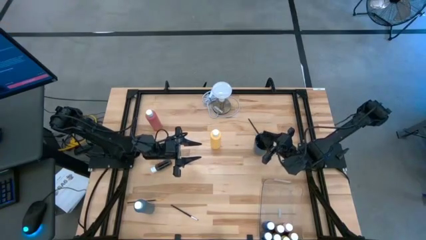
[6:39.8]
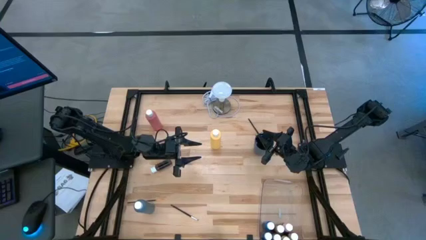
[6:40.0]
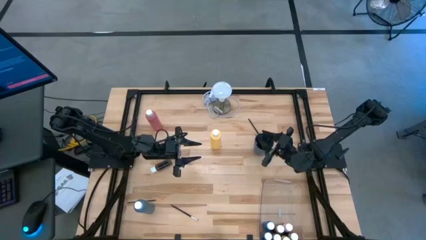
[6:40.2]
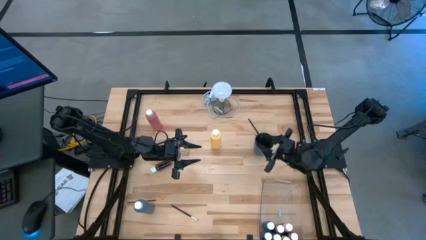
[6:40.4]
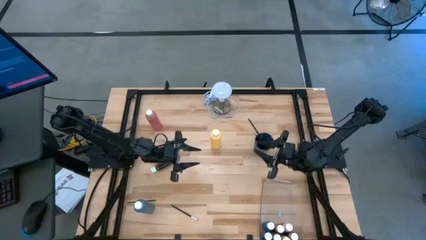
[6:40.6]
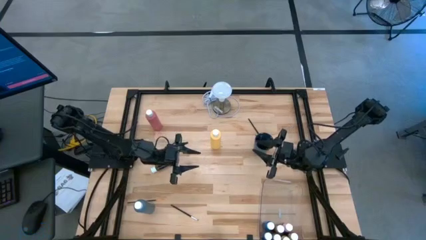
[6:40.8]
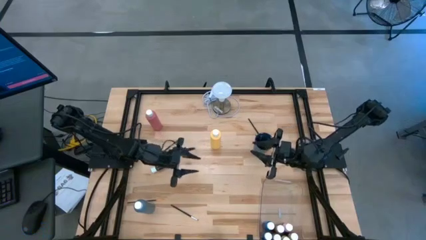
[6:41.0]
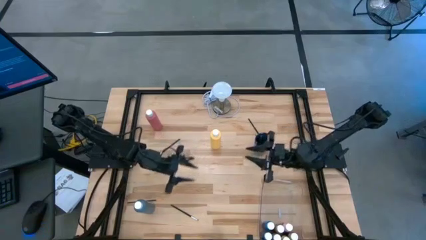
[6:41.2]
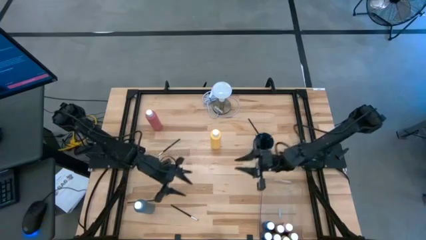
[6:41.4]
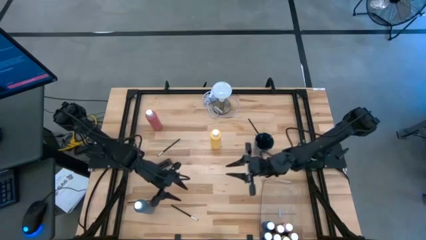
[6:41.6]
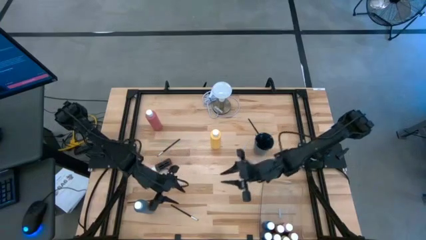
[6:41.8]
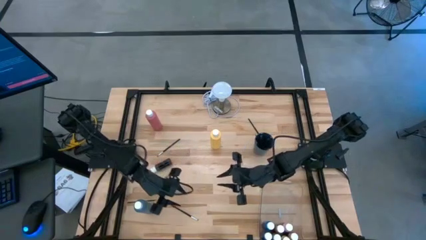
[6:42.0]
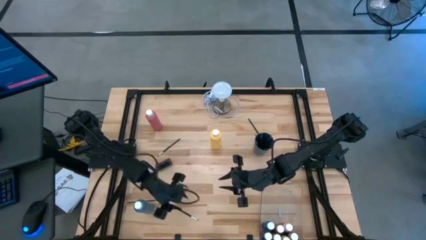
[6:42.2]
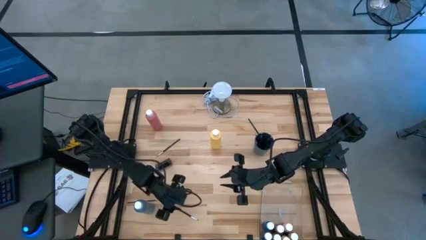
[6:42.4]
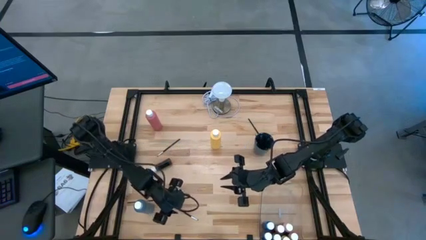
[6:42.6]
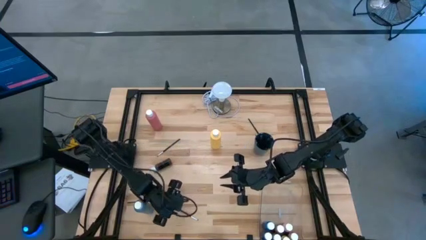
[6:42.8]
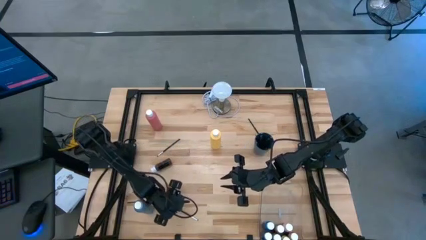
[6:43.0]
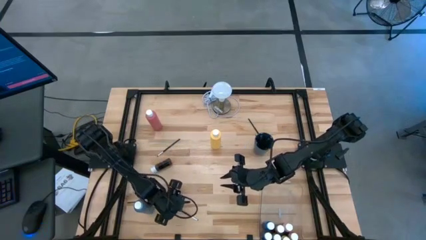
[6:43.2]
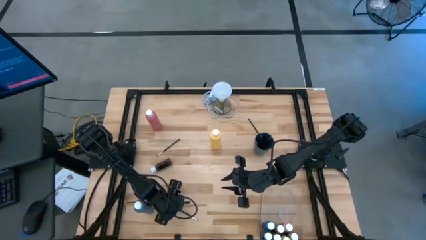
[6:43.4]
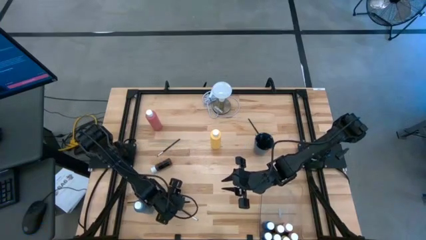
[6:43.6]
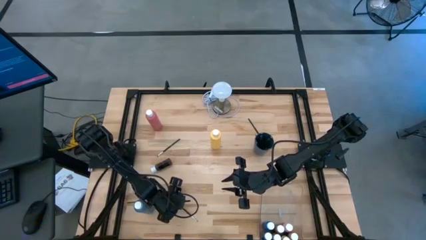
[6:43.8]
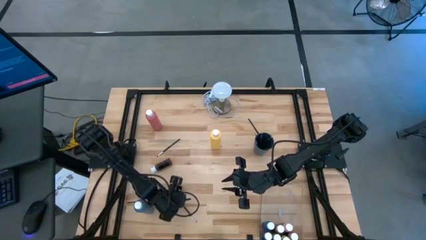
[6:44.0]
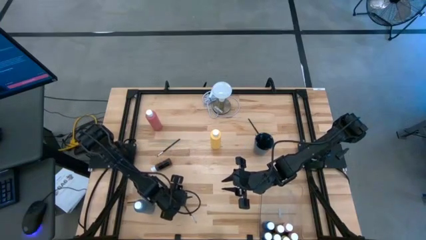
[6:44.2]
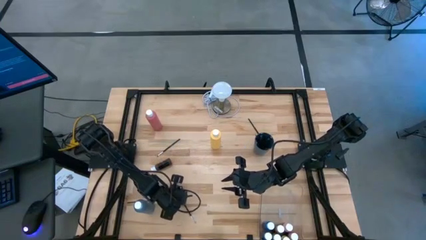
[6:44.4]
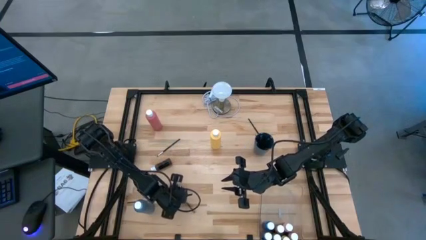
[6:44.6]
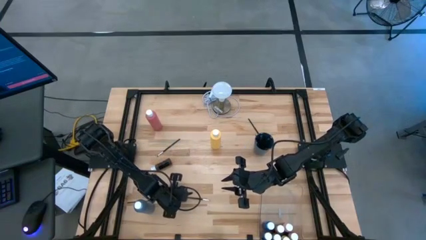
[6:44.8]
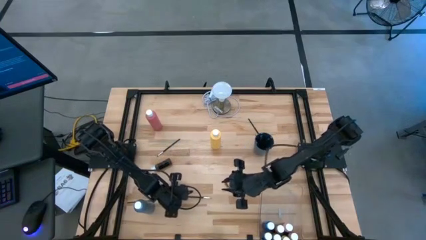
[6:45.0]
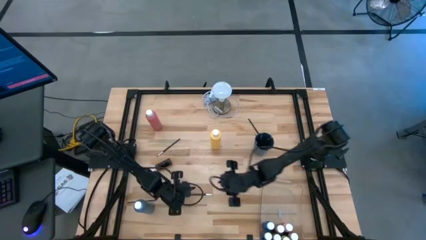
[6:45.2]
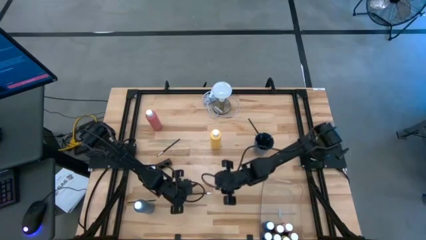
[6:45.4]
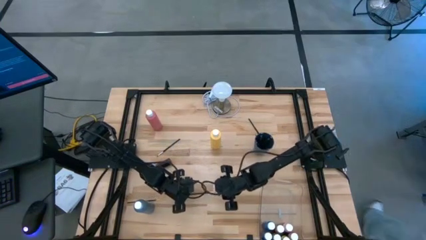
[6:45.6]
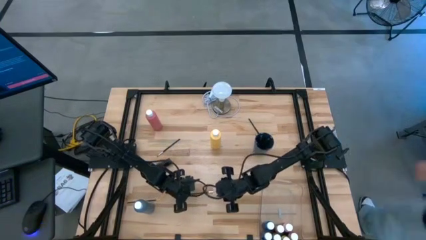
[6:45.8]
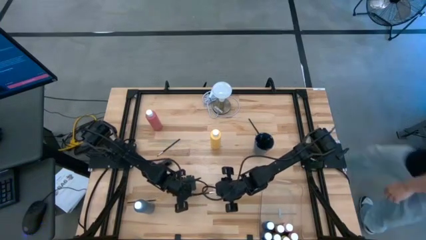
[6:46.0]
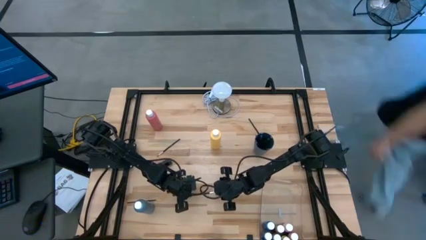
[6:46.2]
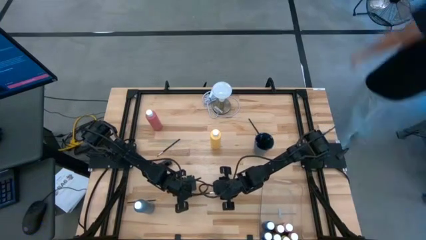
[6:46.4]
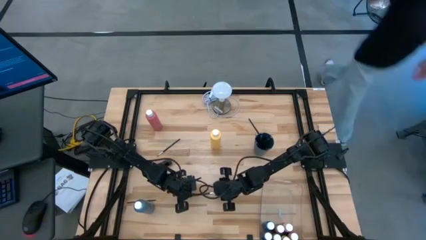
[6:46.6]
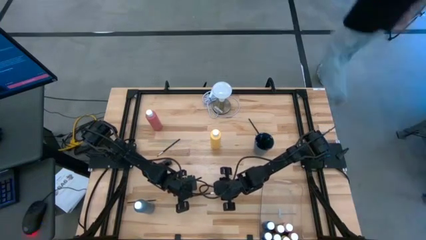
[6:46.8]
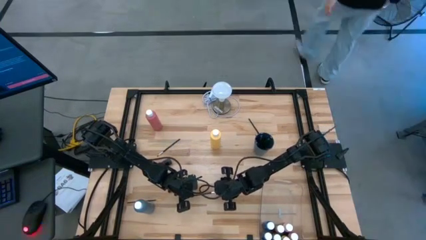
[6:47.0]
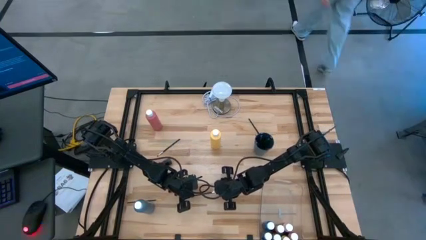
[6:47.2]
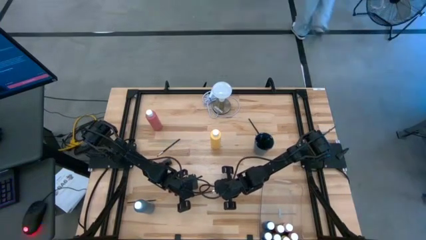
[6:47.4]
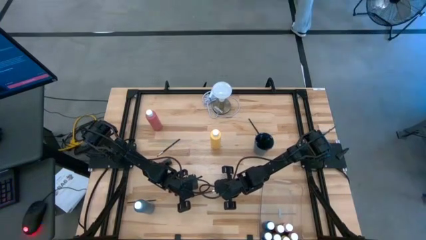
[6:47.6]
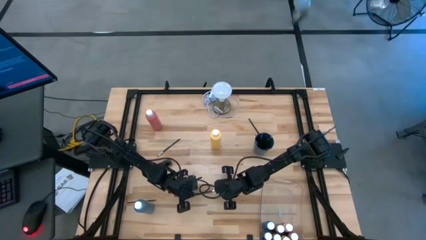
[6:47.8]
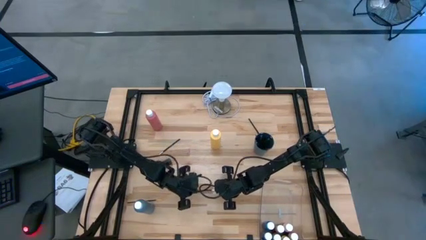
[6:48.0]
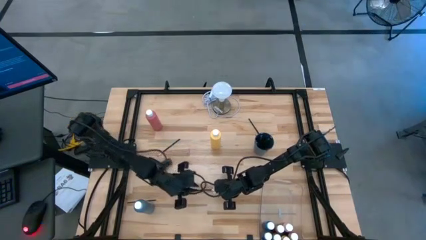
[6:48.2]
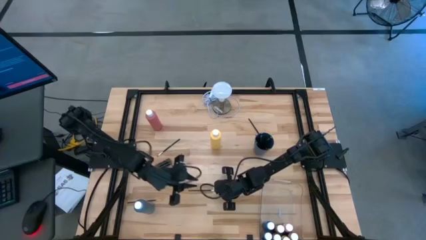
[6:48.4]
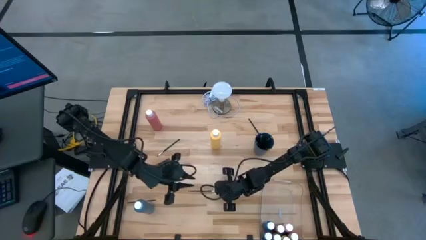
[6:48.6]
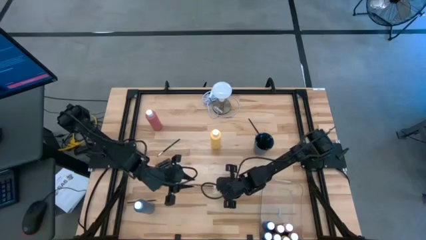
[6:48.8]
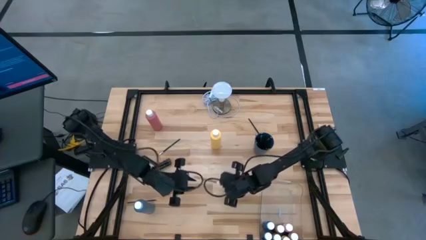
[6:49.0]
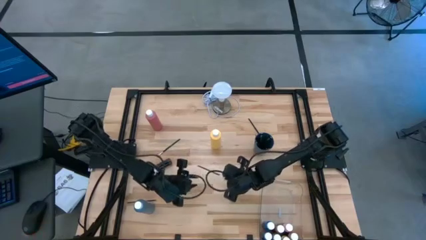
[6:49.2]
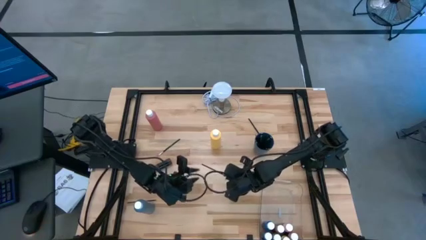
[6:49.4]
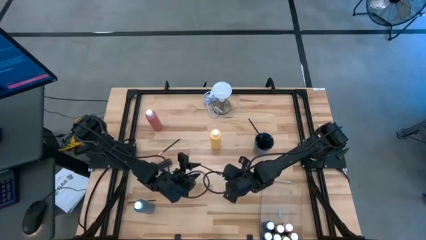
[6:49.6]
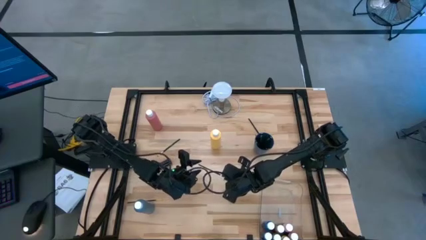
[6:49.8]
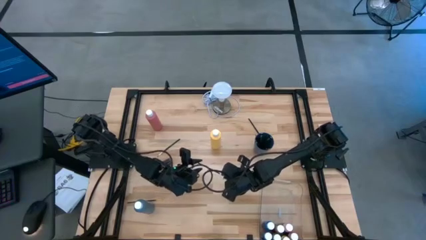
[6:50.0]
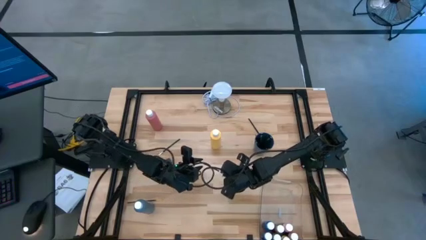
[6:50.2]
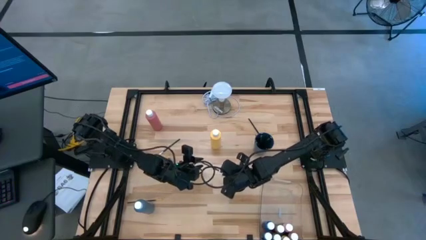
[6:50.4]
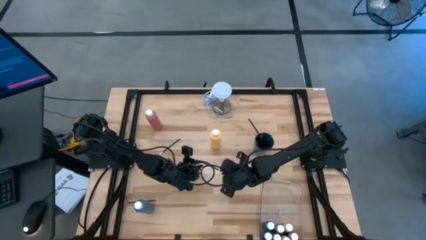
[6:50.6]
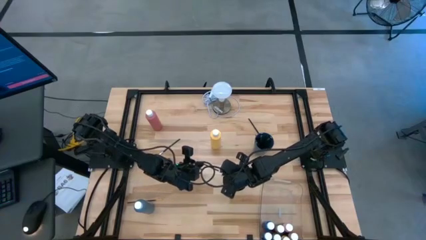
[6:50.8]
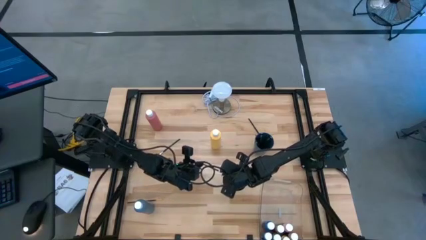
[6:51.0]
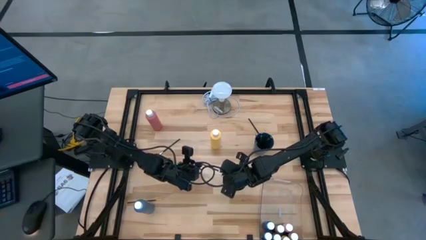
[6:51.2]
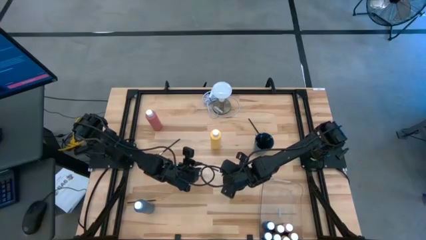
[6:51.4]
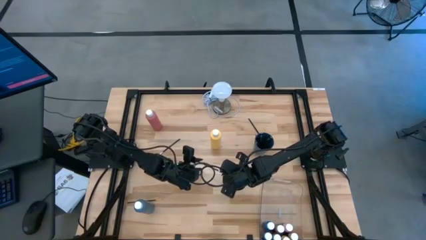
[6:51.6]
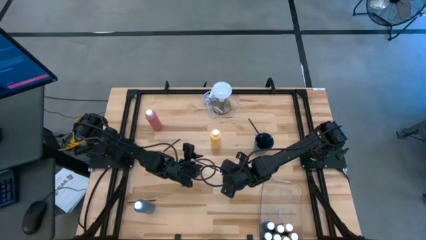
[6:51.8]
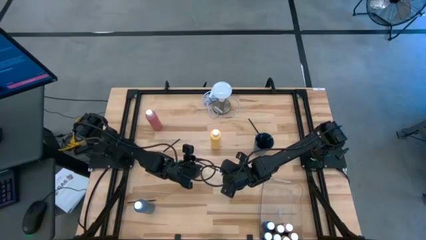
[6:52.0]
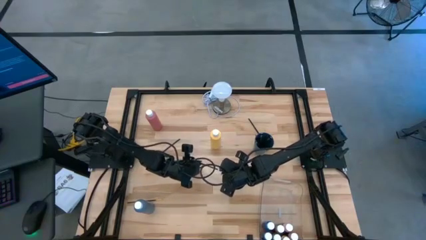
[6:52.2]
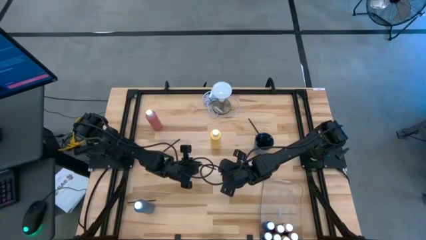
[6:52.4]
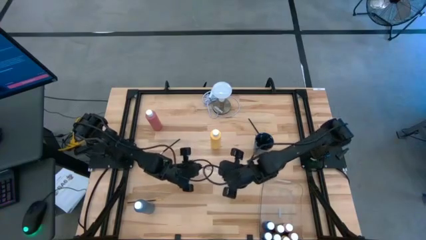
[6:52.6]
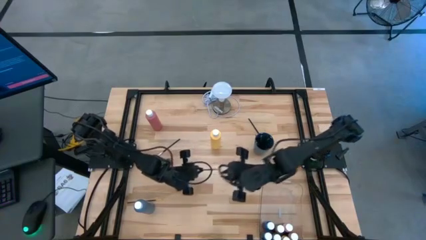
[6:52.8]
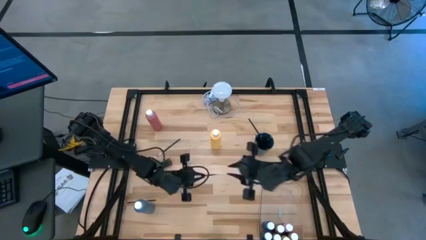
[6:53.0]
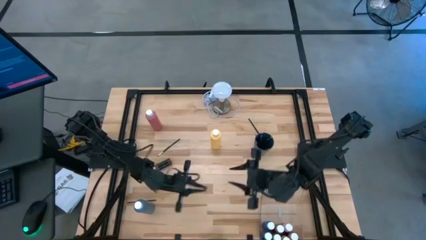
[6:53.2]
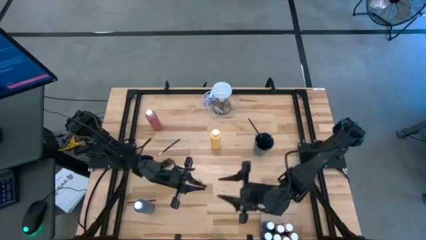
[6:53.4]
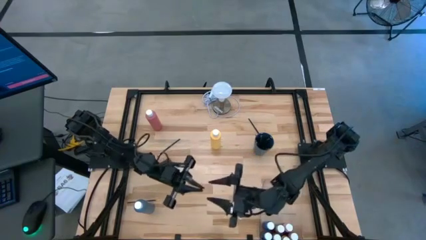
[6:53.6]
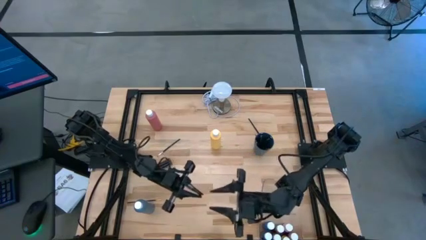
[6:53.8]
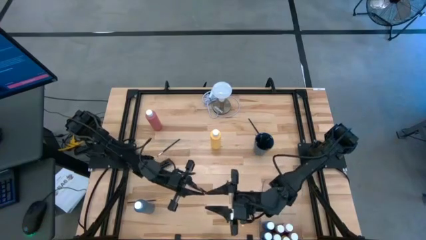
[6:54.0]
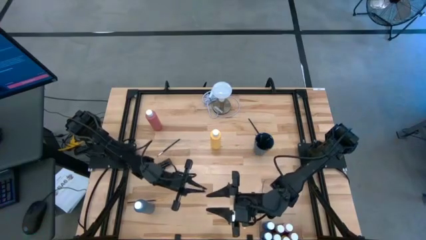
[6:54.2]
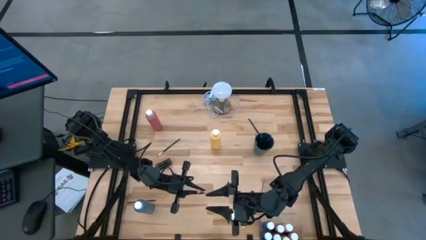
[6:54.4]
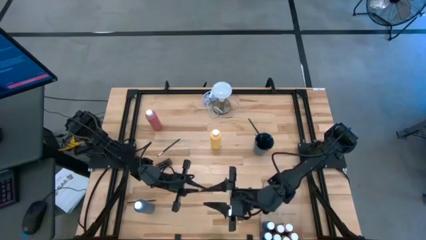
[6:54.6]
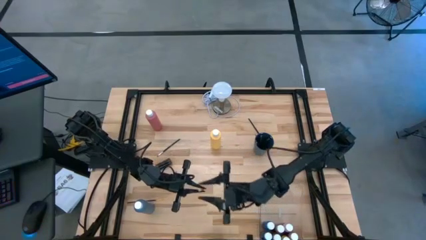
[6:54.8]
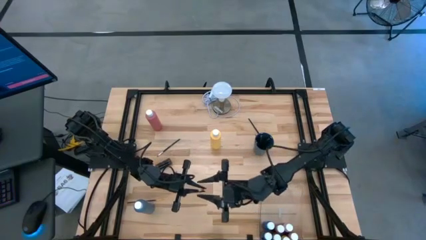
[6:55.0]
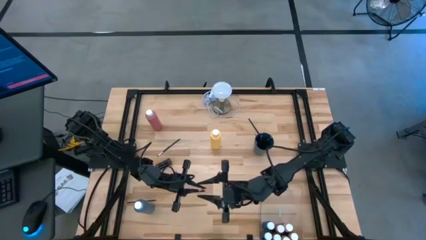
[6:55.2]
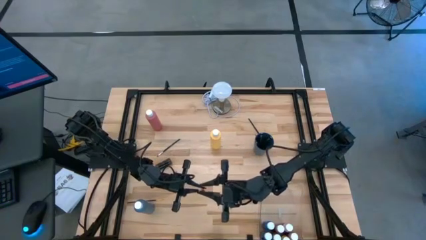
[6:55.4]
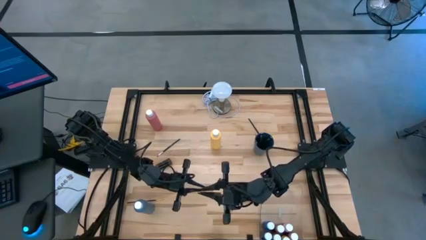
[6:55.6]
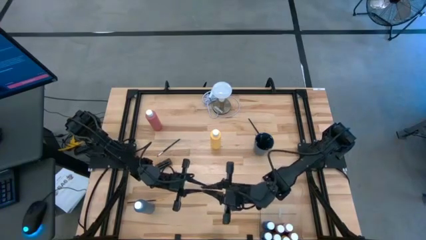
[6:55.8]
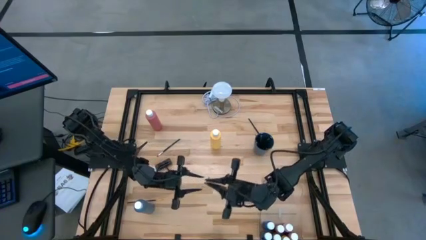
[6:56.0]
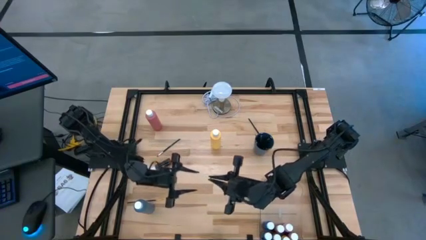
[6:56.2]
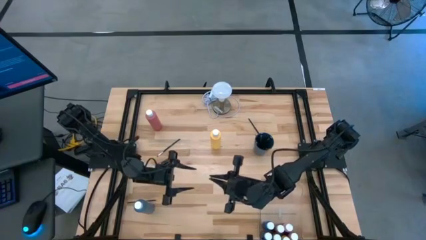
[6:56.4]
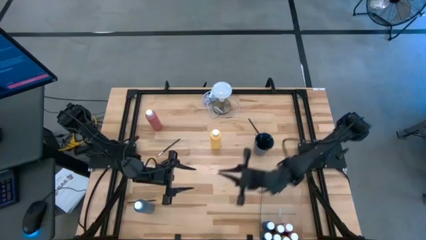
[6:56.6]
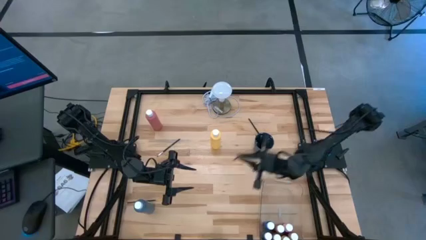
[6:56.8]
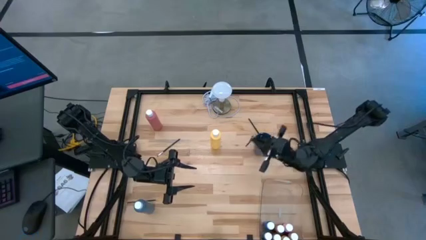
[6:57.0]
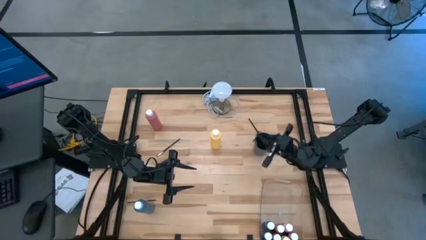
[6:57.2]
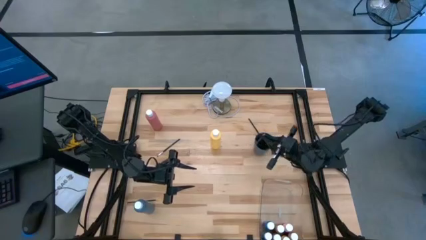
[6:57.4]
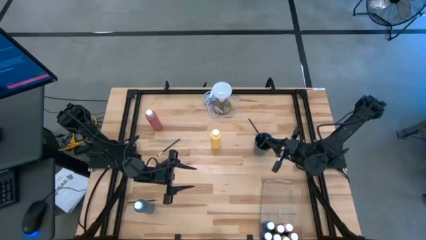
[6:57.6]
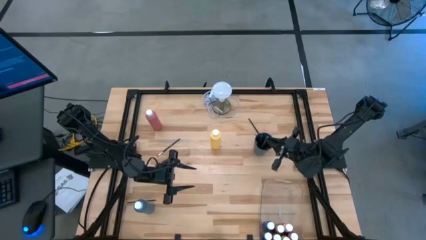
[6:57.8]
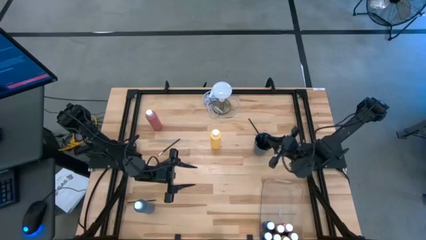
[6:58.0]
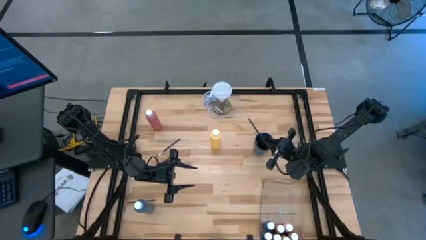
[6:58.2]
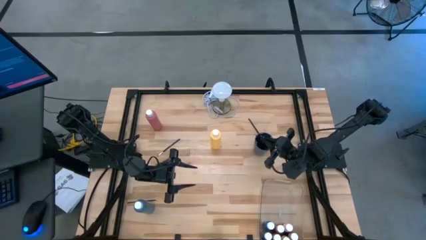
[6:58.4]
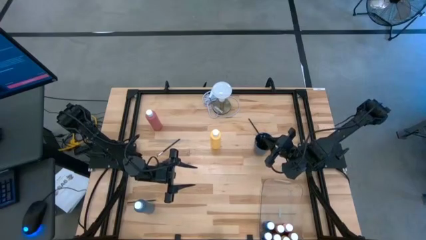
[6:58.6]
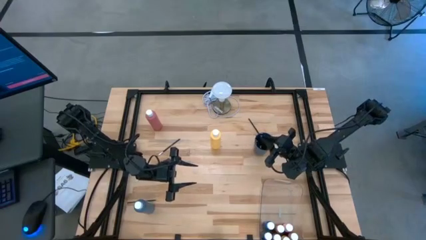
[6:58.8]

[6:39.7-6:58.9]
Task: Pick & Place Paint Supplies
Put the bottom black silver paintbrush into the blue cup
